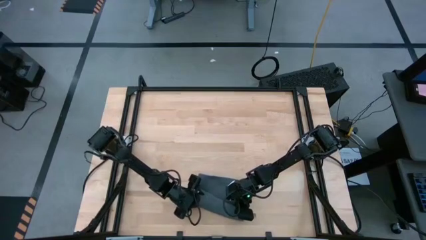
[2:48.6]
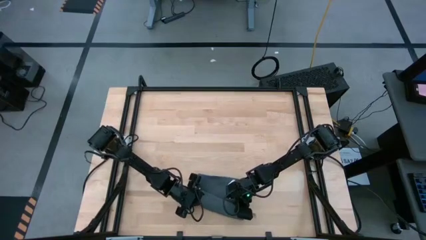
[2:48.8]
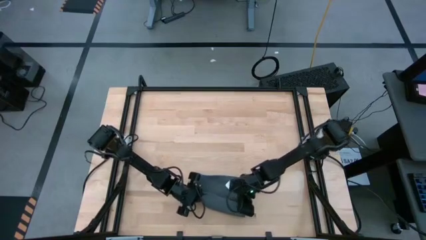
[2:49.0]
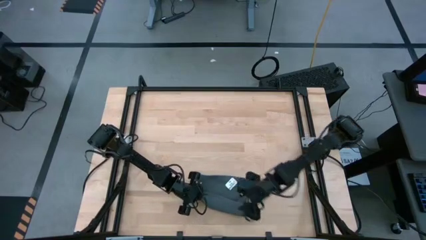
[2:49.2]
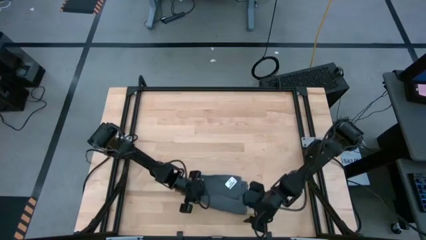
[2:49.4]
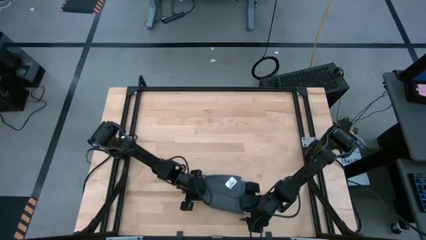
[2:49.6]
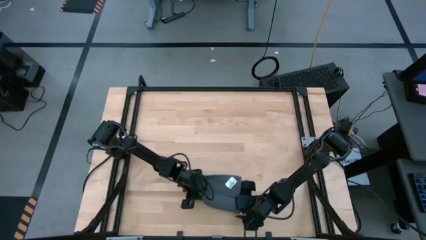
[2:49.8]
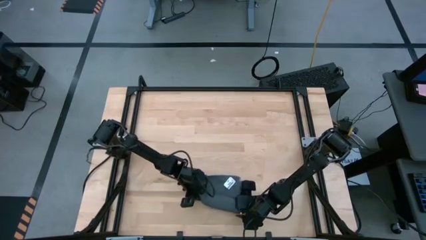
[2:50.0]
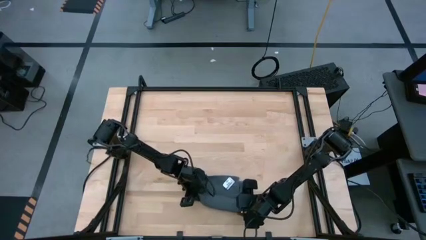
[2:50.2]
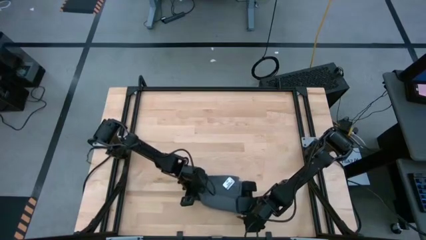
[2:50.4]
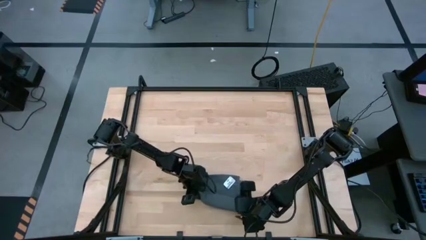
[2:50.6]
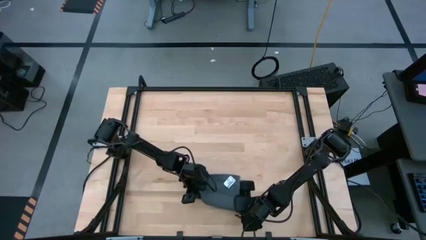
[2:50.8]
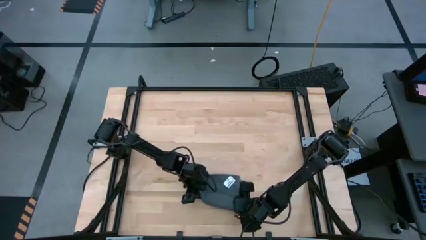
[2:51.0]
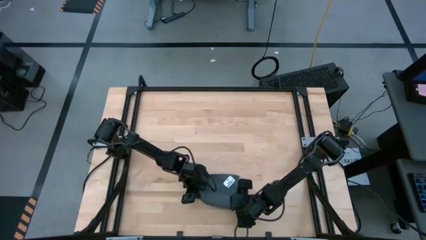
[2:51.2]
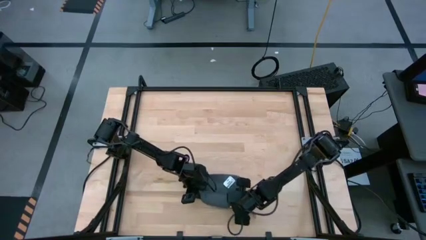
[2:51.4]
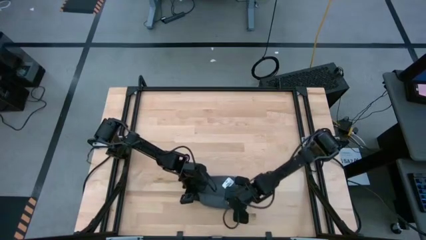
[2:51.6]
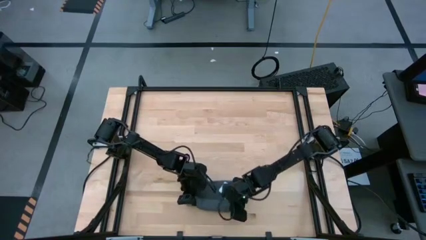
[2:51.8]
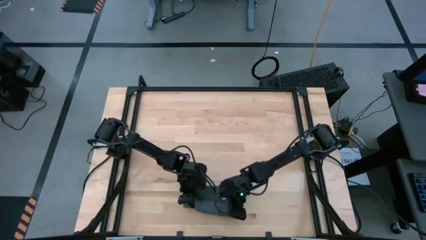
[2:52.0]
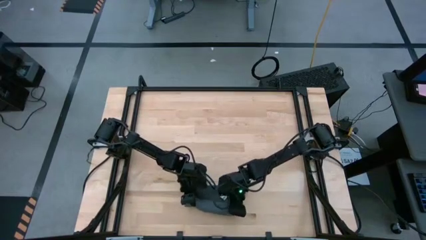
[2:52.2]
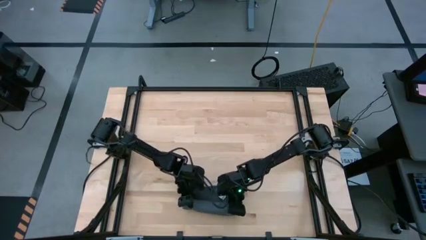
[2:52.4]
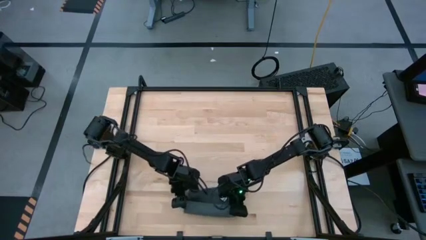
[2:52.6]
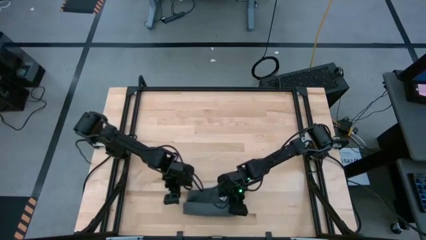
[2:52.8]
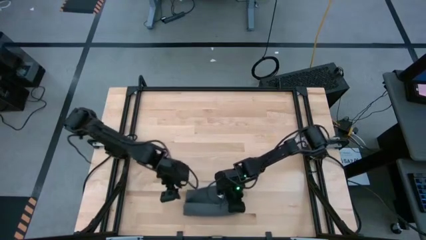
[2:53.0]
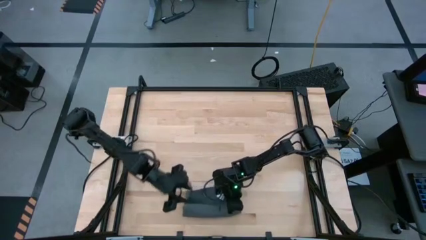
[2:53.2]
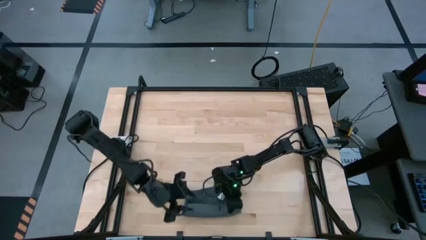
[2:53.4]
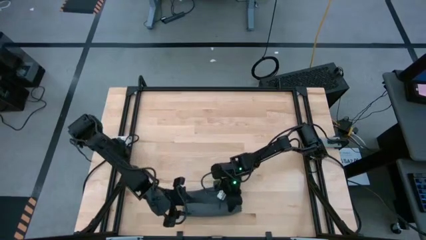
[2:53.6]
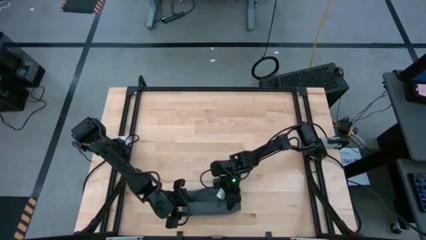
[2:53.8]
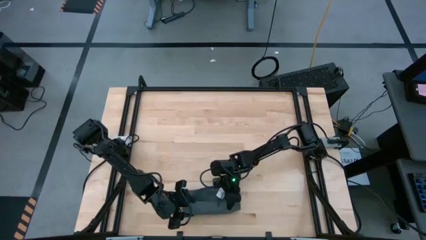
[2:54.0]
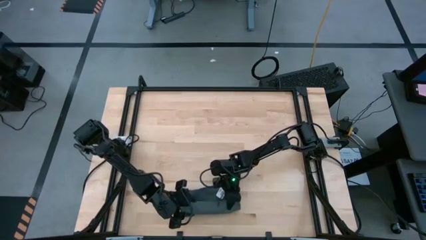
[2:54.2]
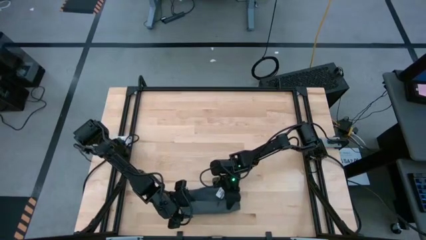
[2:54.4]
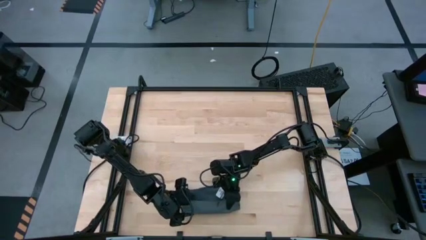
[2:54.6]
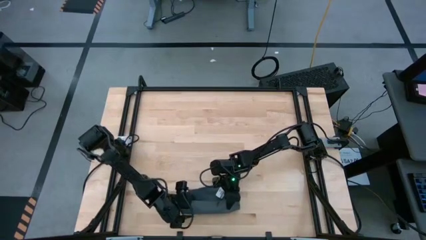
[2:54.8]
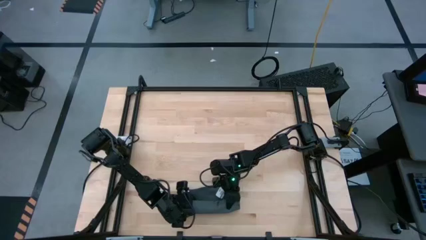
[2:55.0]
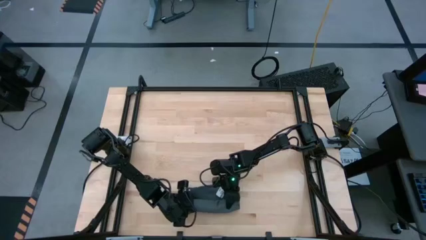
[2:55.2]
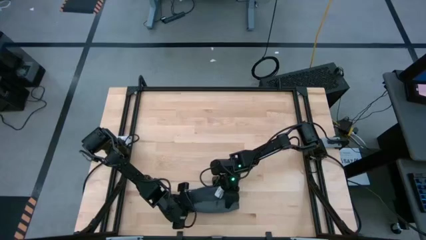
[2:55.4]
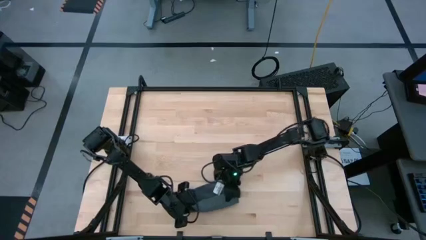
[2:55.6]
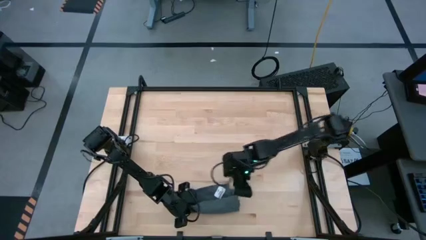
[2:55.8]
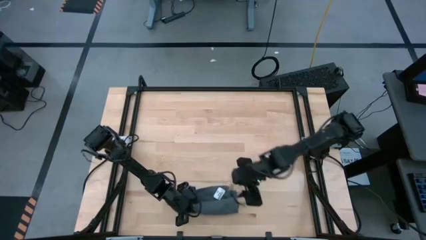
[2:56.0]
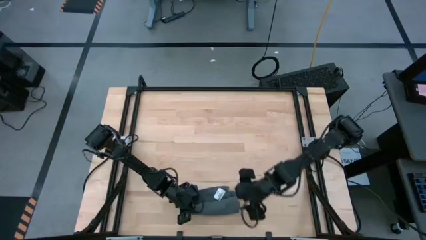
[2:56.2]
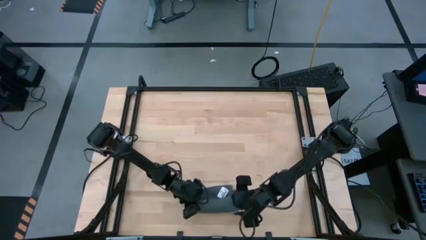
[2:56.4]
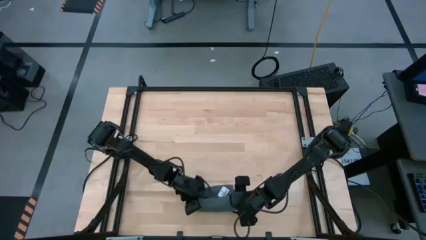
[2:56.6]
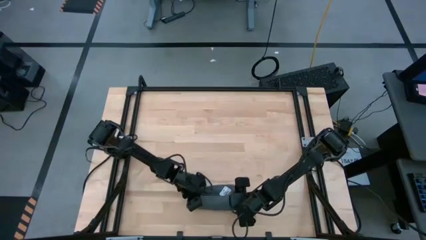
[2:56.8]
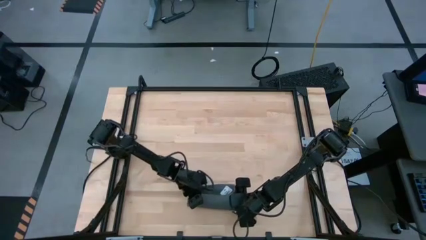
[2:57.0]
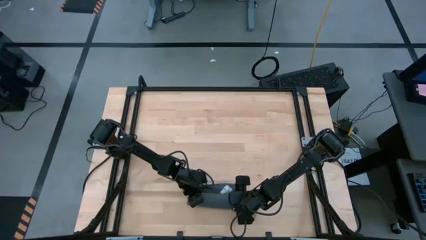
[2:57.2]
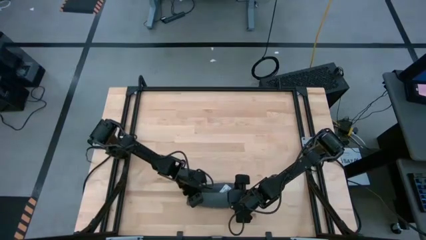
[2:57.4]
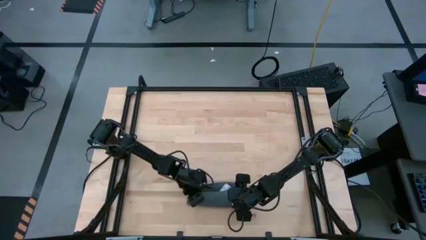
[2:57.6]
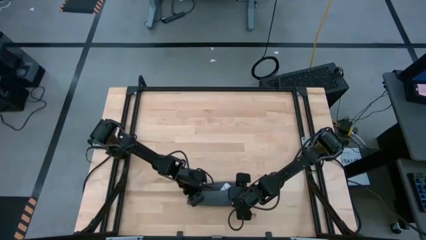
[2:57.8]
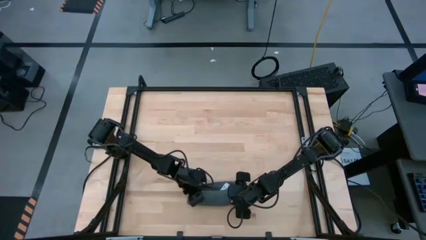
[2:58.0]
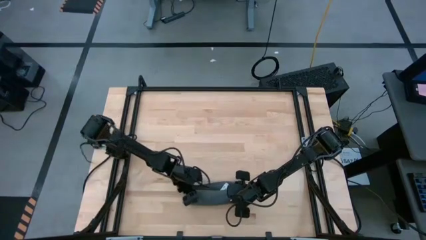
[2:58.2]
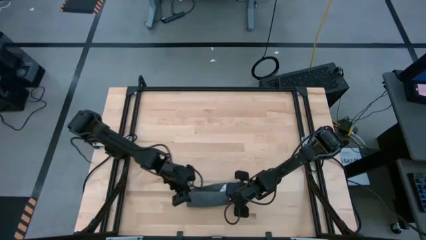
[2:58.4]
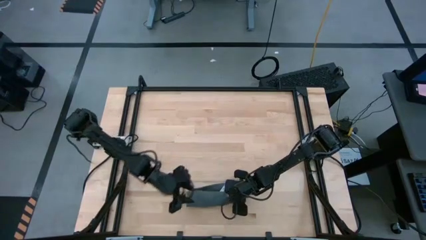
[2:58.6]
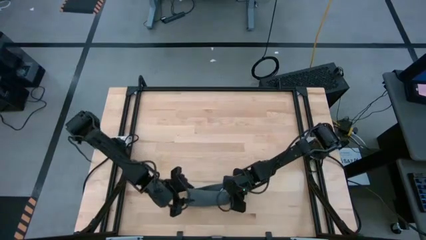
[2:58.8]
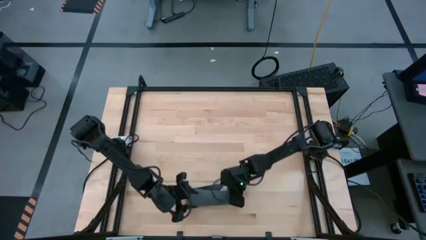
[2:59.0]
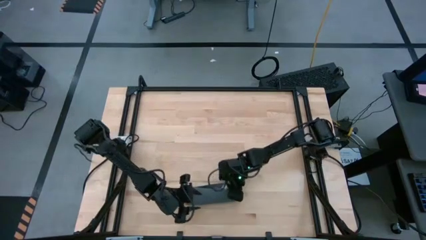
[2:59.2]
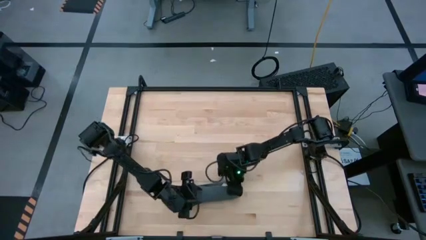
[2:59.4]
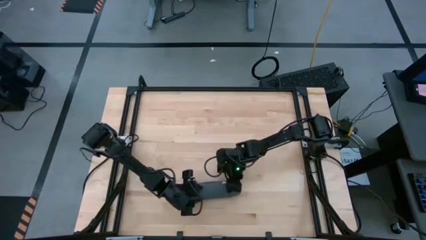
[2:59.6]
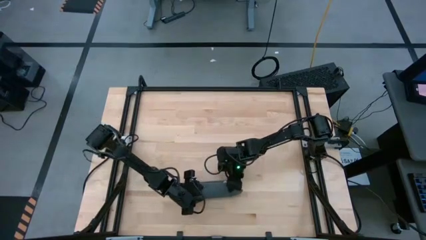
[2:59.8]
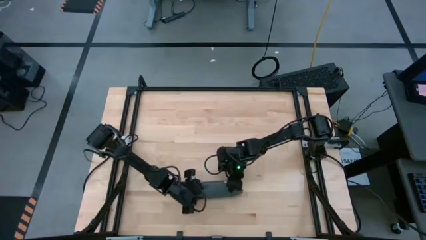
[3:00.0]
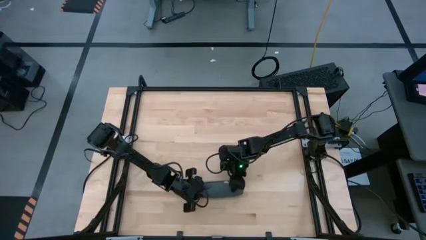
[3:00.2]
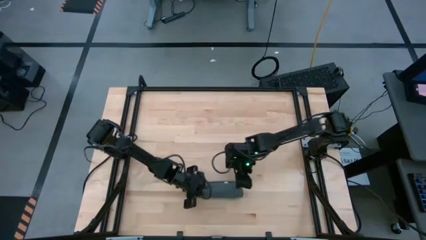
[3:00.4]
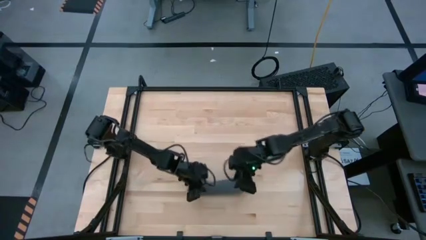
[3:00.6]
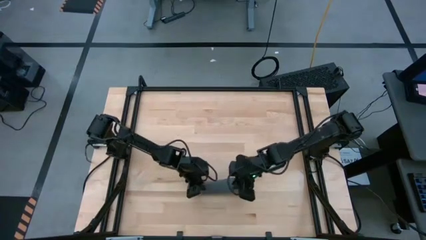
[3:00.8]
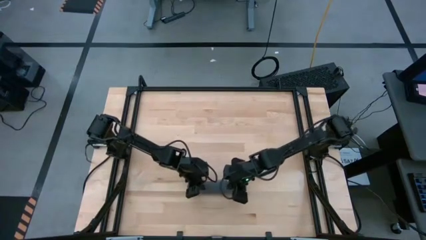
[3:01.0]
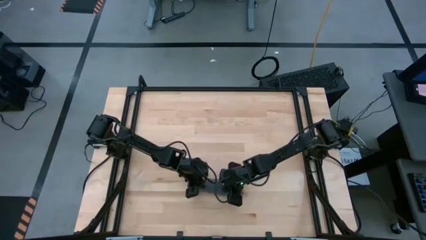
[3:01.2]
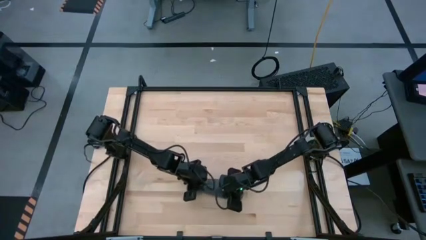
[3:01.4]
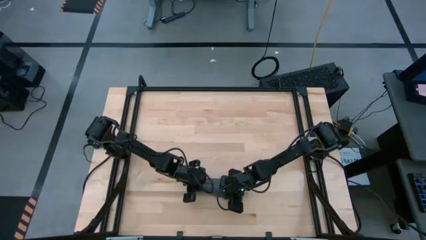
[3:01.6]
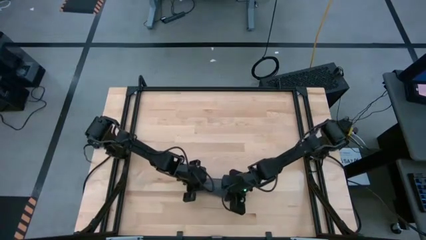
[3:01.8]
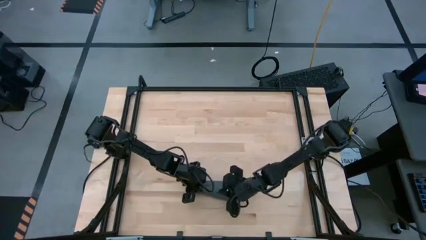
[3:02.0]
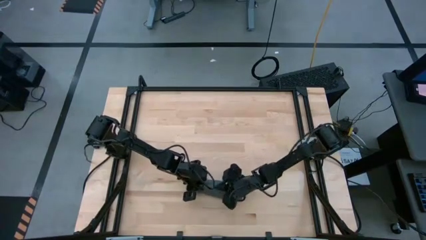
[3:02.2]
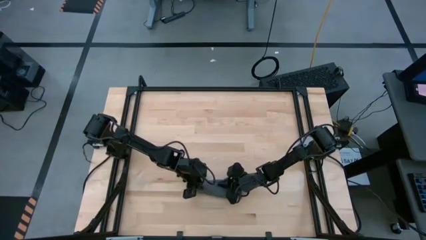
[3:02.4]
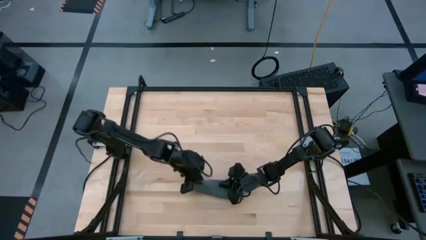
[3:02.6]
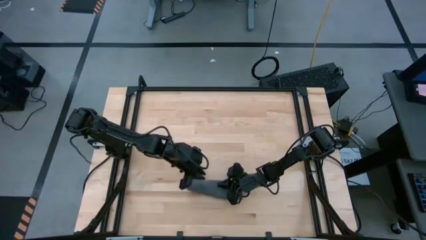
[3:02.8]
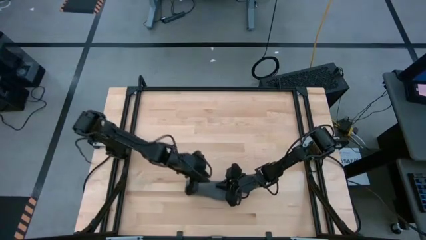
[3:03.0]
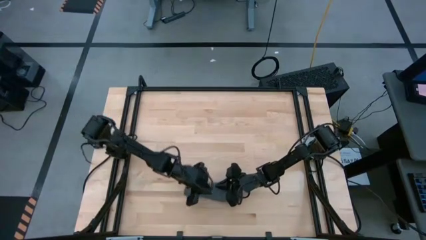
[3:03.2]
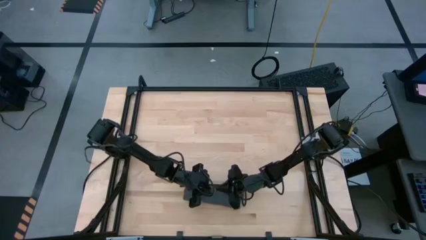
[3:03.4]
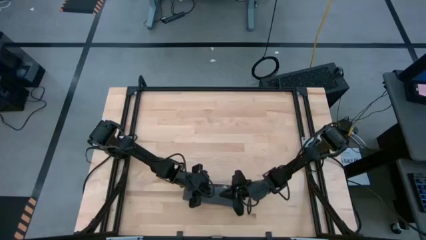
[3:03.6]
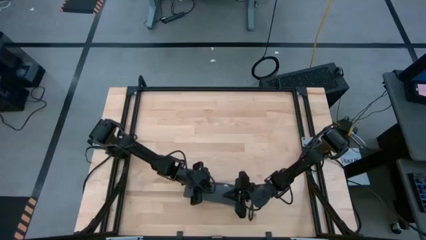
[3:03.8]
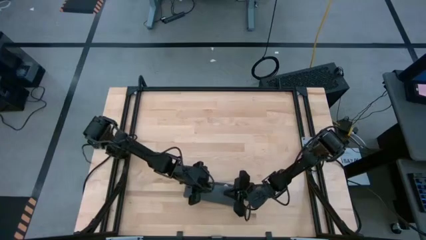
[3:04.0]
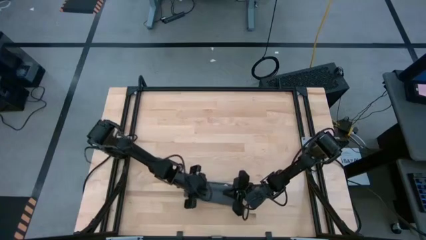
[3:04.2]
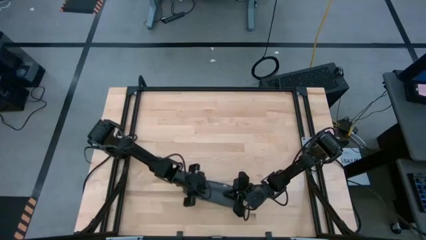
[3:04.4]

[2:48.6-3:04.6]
Task: Roll towel
Roll the gray towel on the center of table
